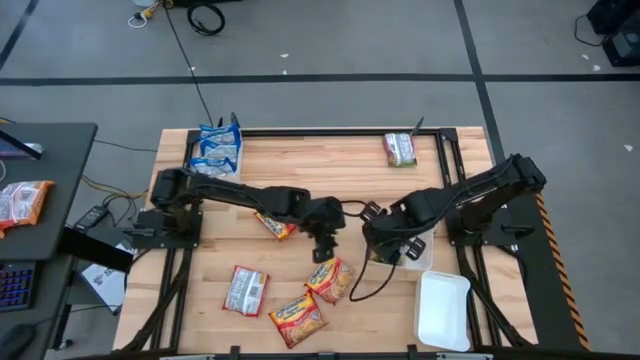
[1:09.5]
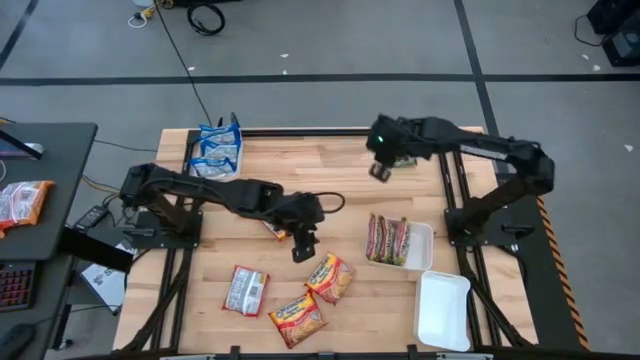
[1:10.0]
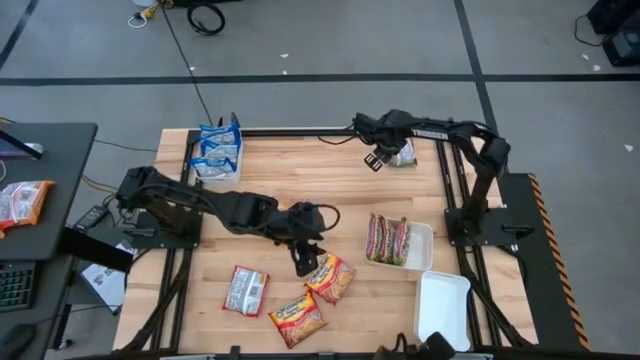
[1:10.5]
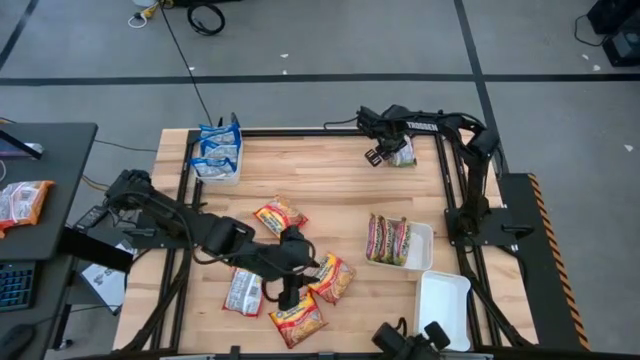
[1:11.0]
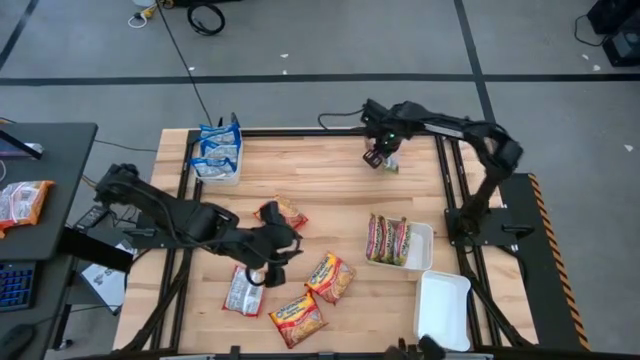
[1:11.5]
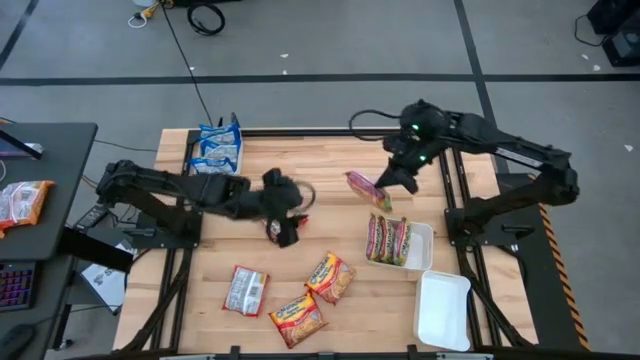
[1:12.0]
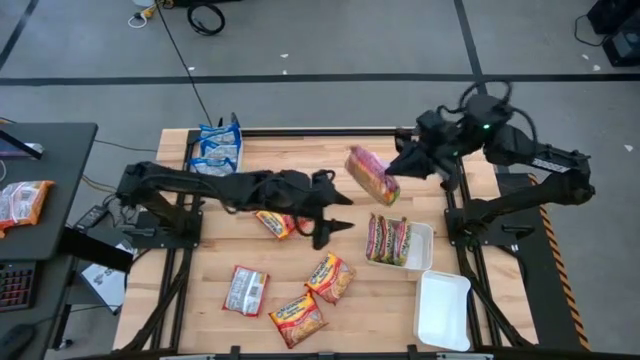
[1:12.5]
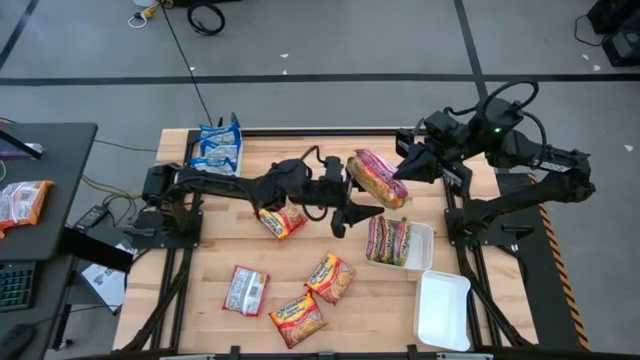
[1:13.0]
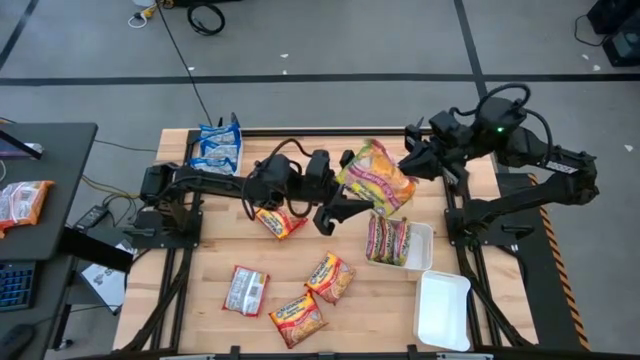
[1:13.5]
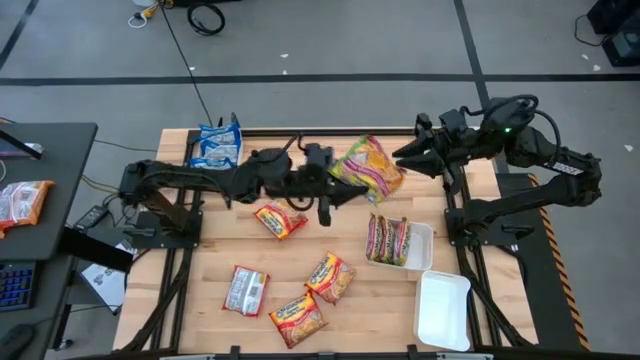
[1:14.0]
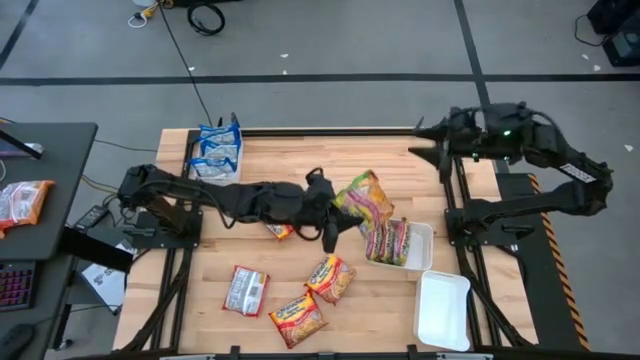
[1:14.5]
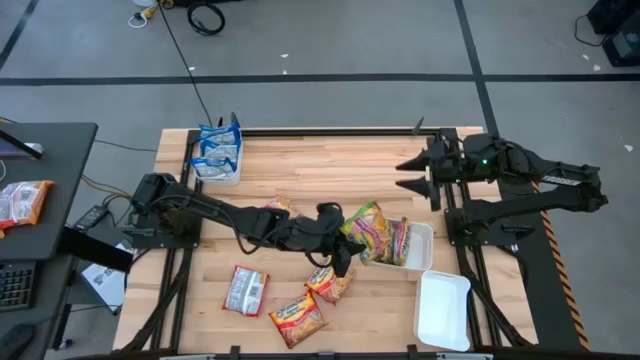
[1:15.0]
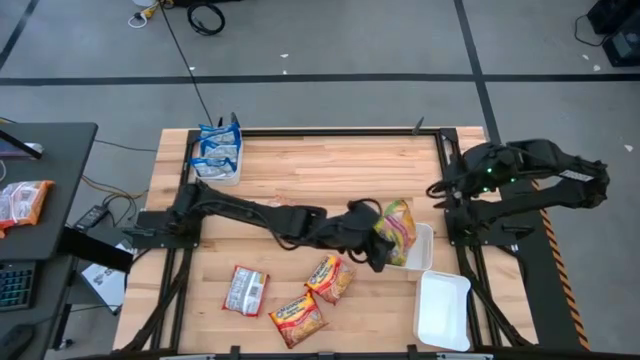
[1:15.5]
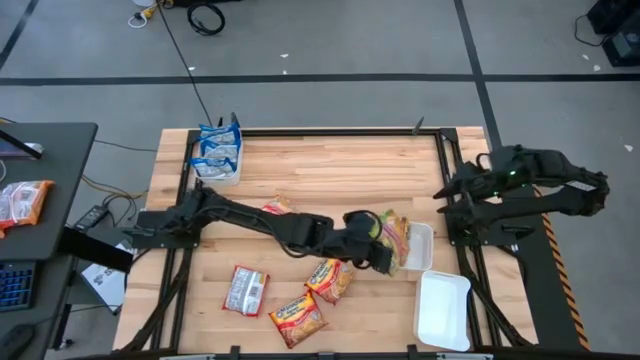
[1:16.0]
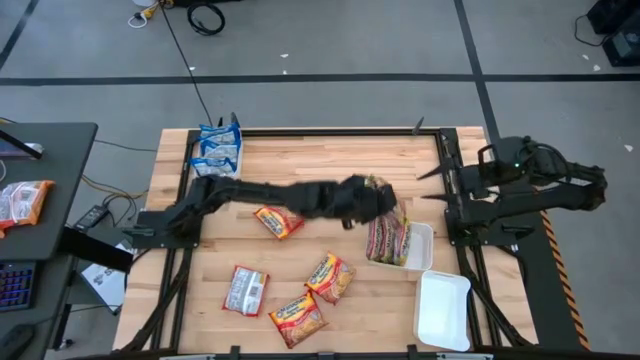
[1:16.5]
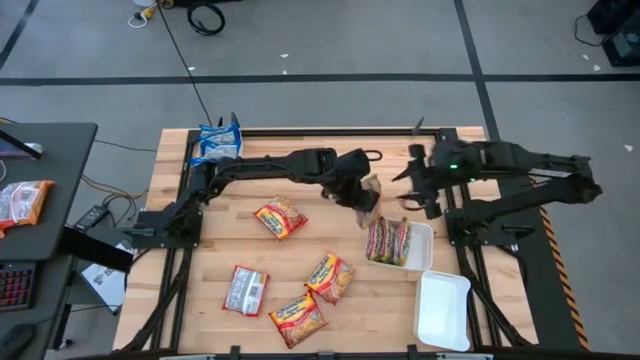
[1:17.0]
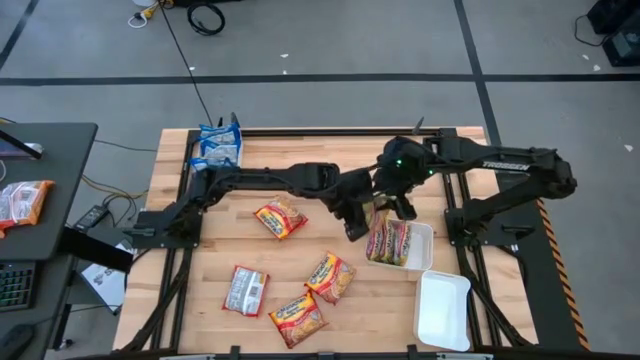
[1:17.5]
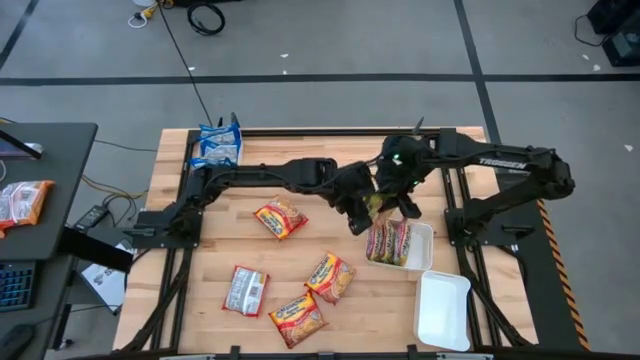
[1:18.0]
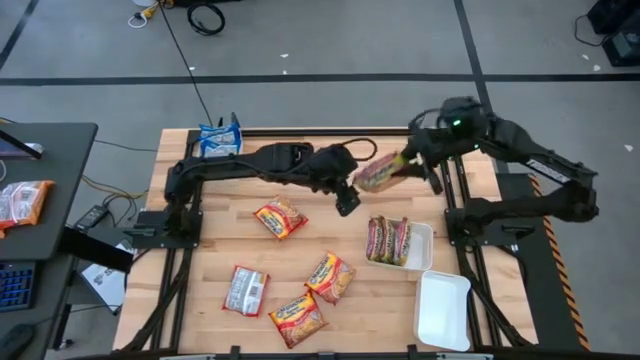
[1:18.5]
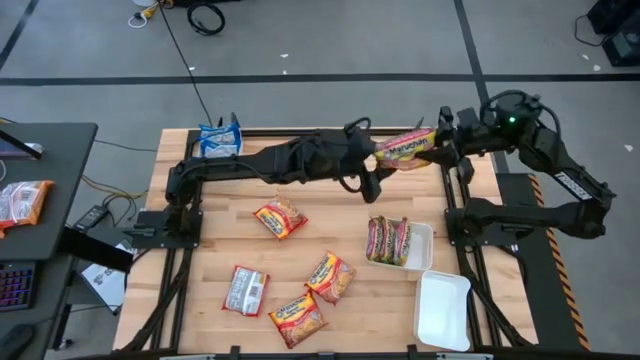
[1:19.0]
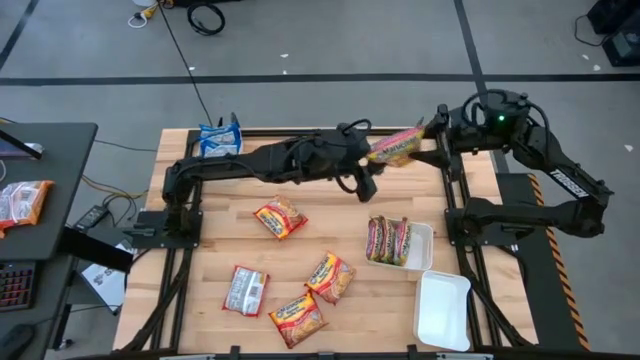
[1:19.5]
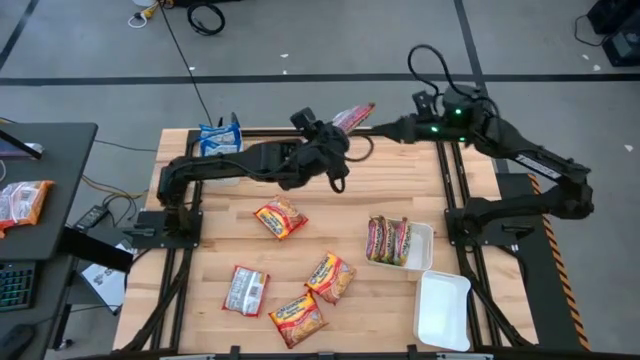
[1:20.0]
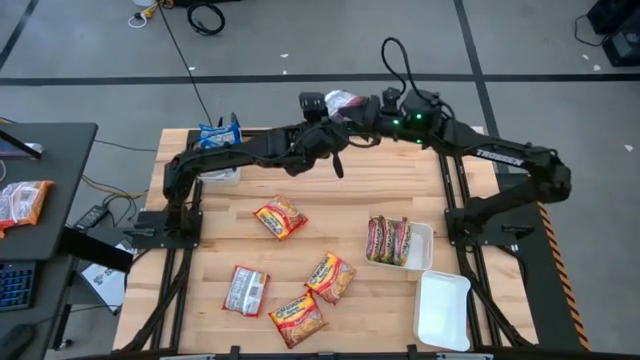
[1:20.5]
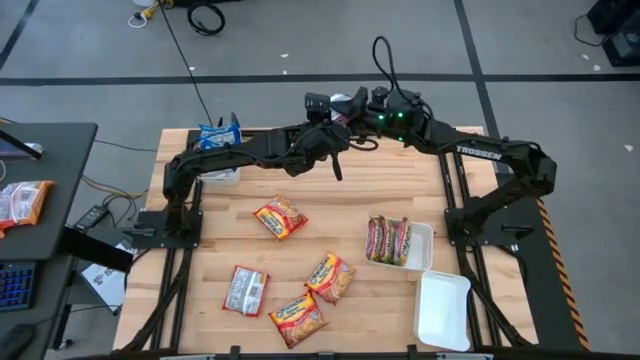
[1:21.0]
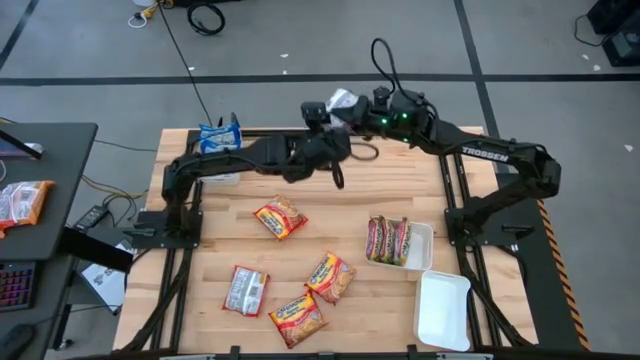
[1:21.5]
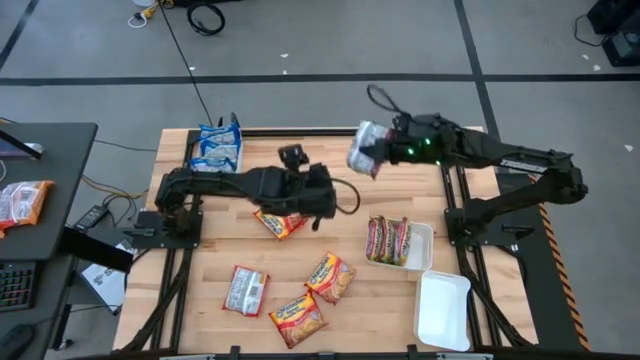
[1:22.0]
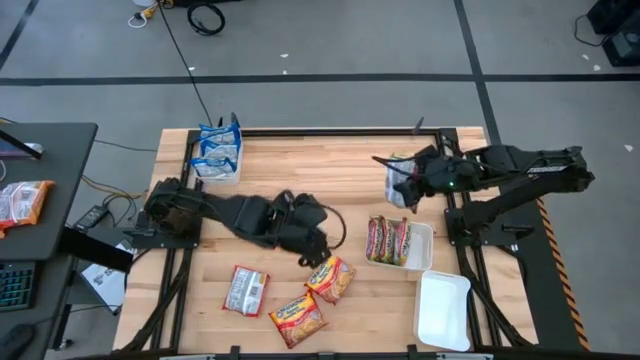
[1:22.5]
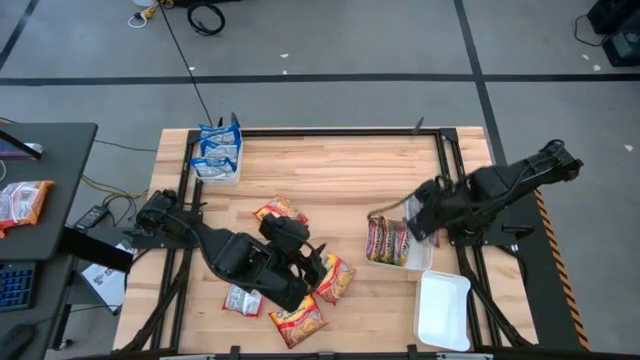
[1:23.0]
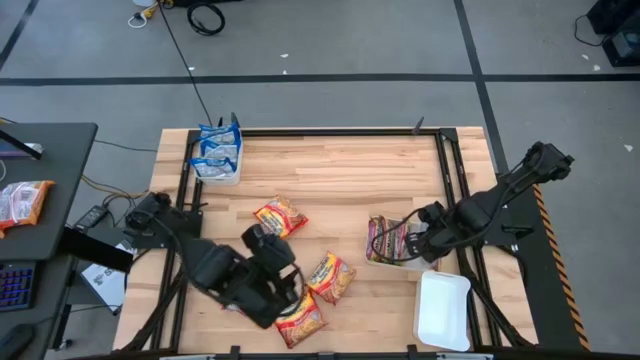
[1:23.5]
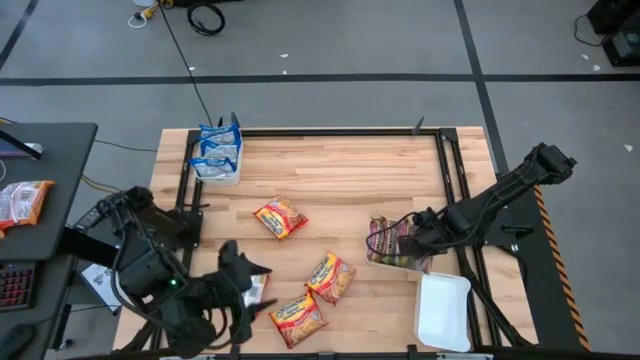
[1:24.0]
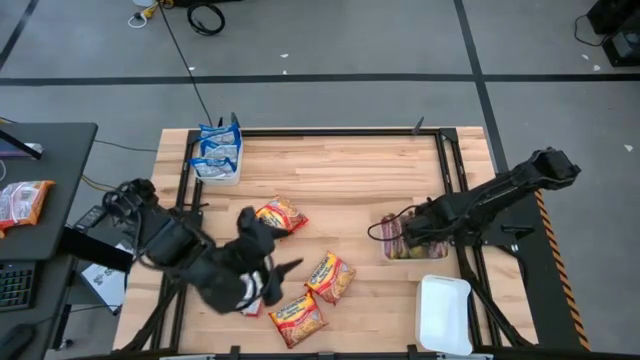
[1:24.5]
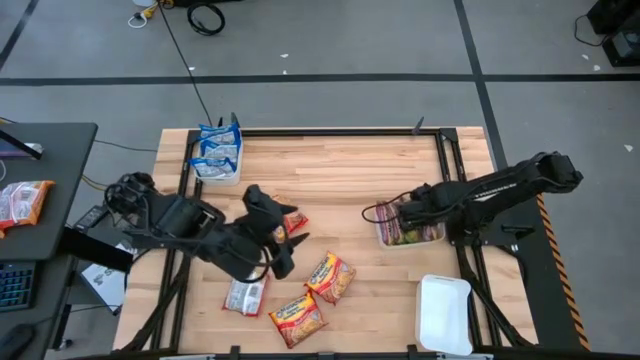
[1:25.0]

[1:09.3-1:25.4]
Task: Sort Maruchan noodles
Put the green noodle pack into the middle right white bin

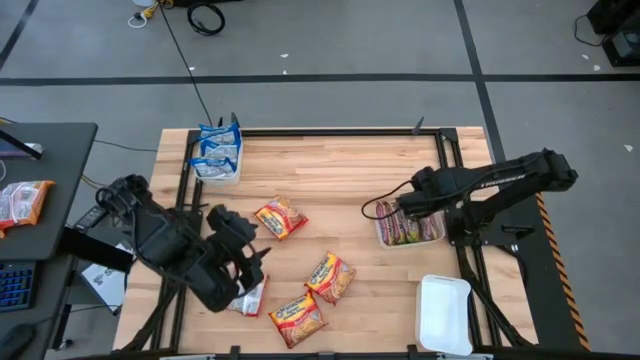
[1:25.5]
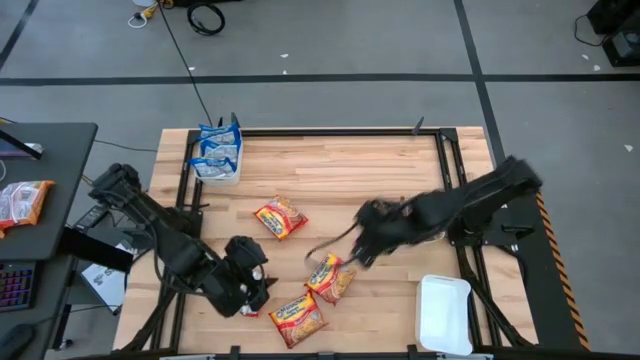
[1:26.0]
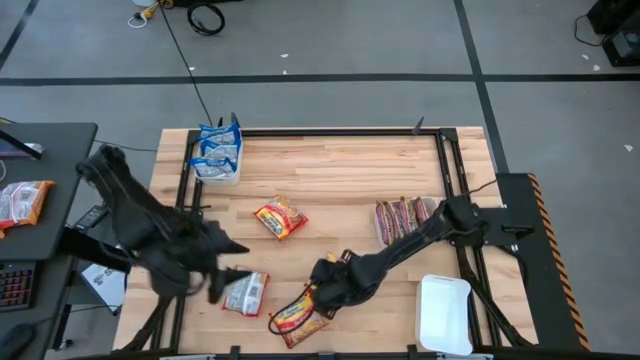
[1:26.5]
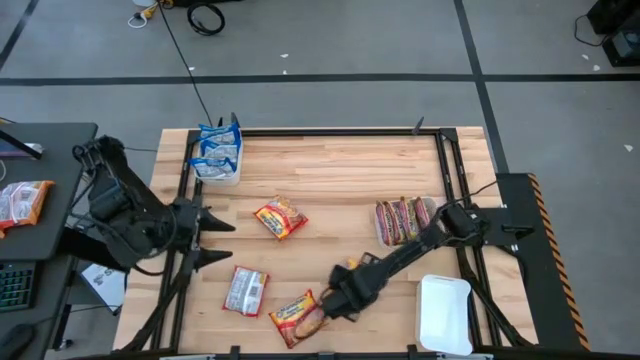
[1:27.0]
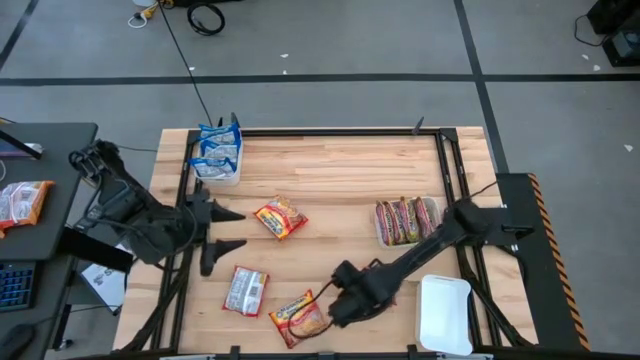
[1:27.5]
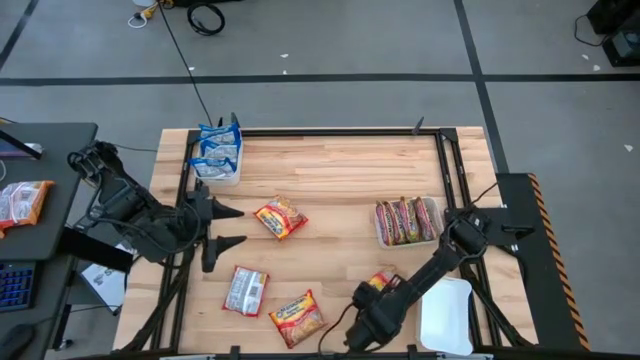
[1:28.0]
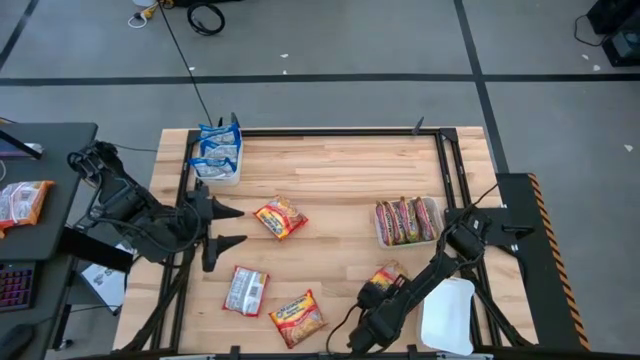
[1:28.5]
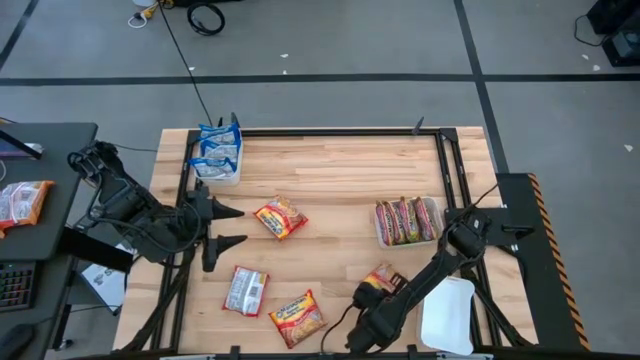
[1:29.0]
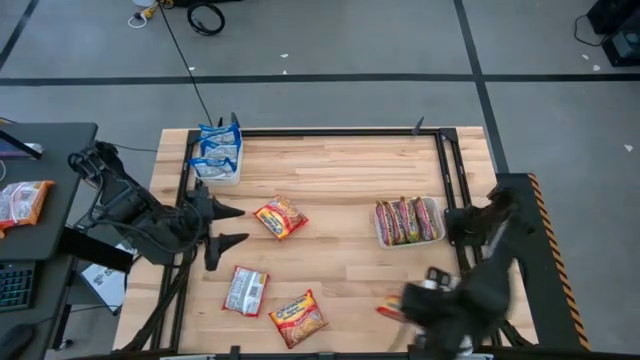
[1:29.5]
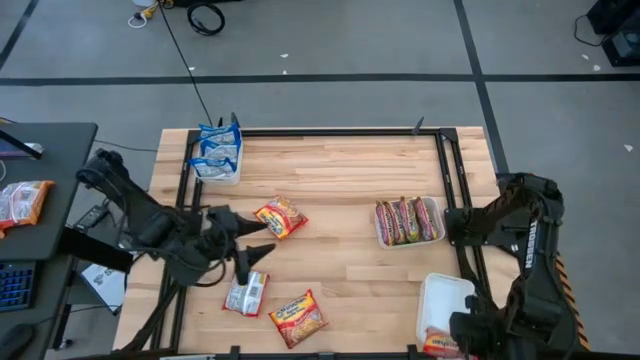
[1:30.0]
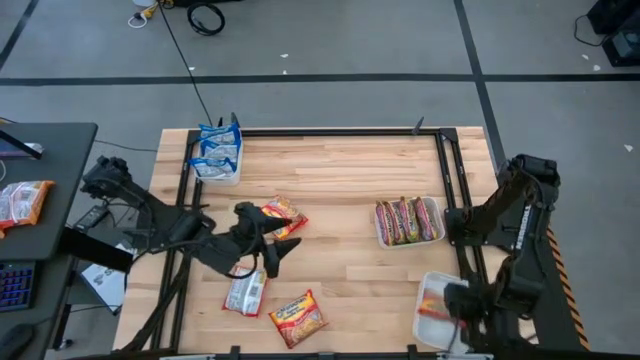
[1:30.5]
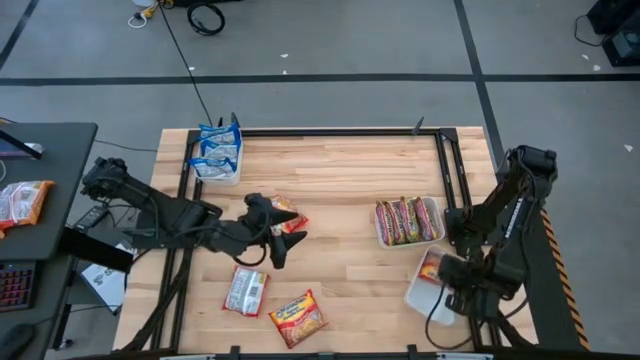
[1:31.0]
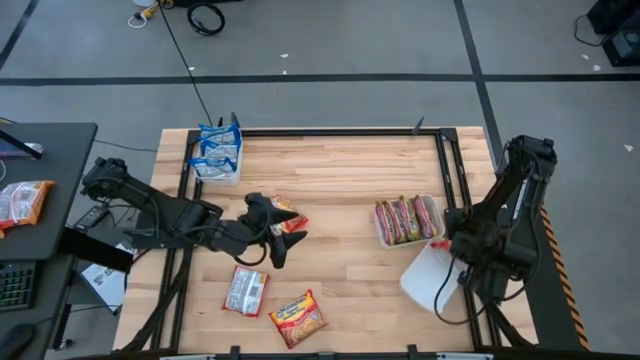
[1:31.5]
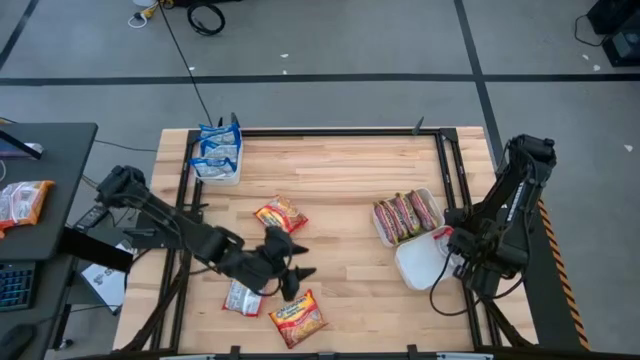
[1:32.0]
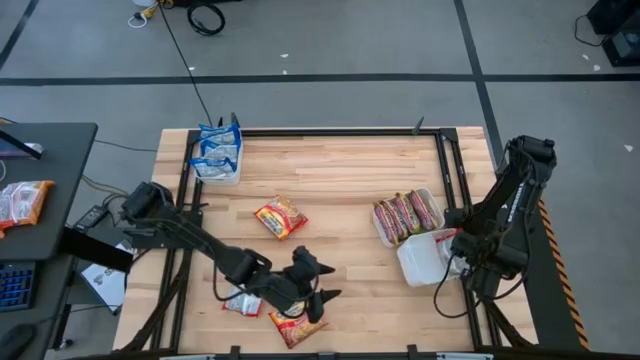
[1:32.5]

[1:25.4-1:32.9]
Put the orange noodle pack into the bottom white bin
